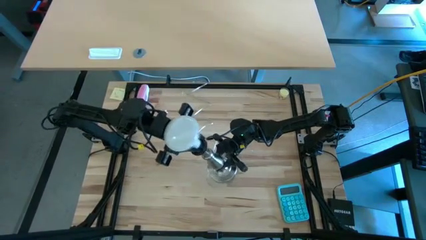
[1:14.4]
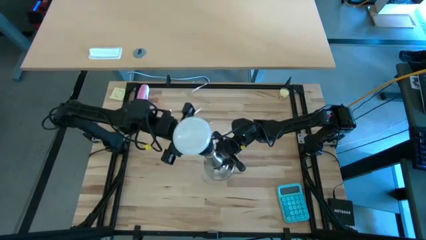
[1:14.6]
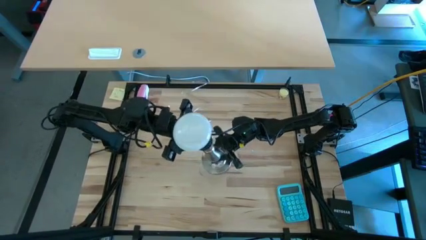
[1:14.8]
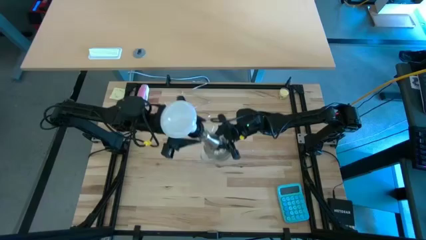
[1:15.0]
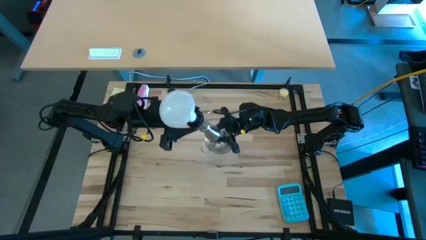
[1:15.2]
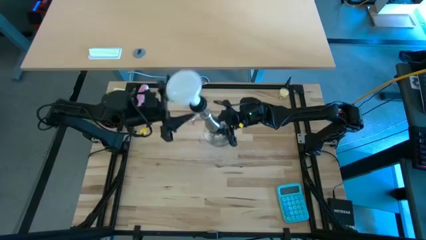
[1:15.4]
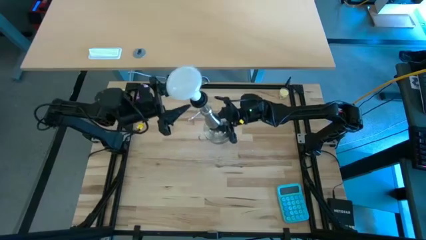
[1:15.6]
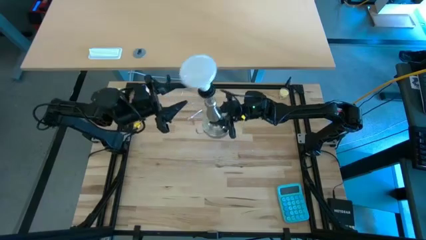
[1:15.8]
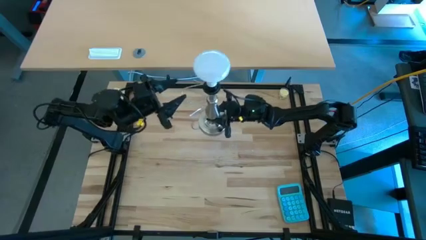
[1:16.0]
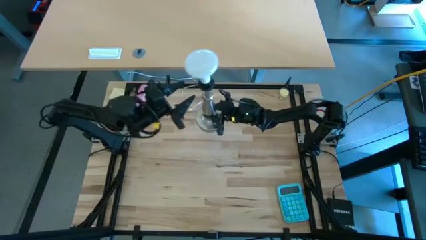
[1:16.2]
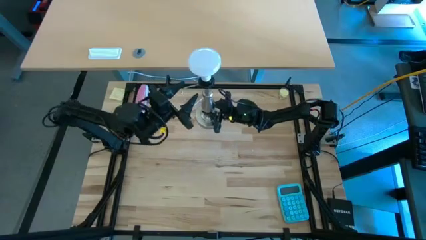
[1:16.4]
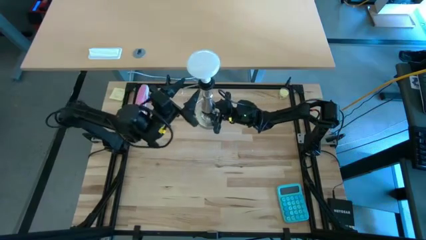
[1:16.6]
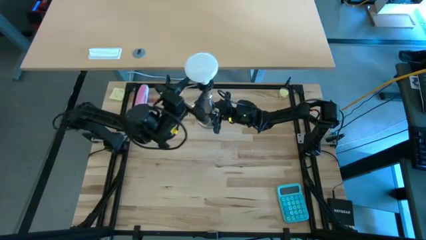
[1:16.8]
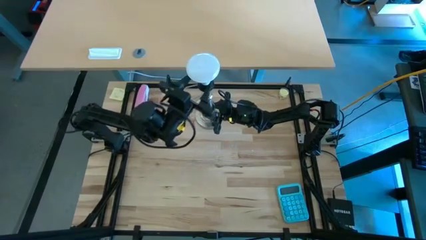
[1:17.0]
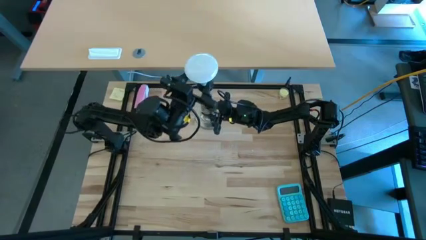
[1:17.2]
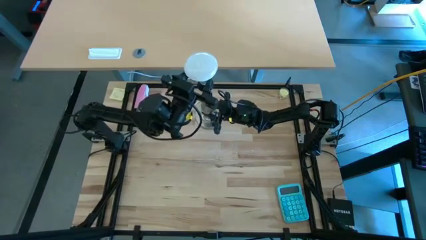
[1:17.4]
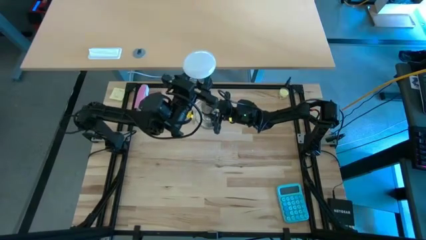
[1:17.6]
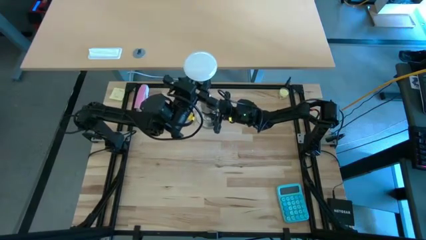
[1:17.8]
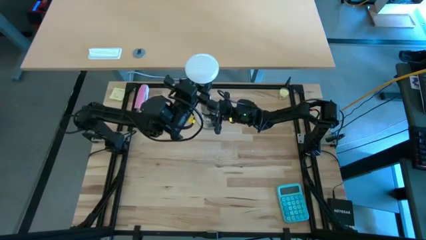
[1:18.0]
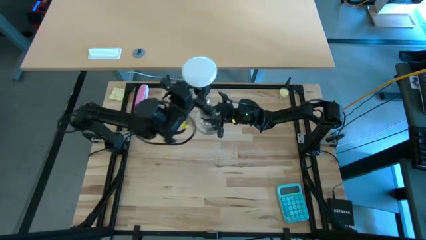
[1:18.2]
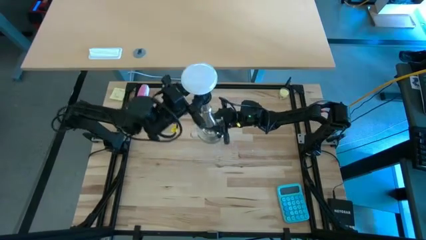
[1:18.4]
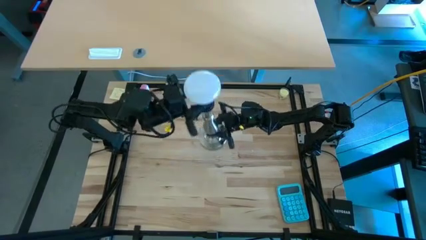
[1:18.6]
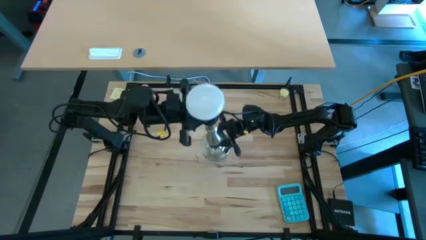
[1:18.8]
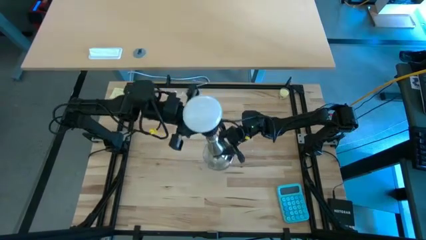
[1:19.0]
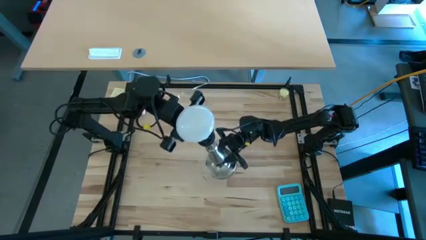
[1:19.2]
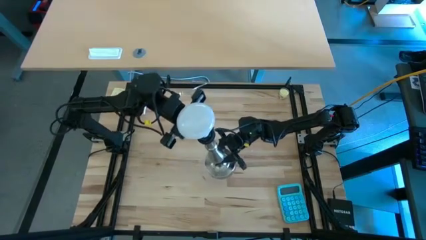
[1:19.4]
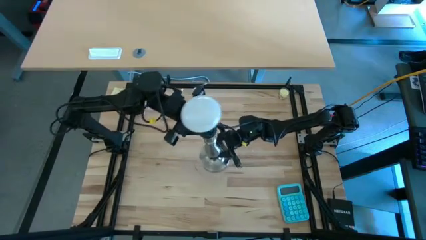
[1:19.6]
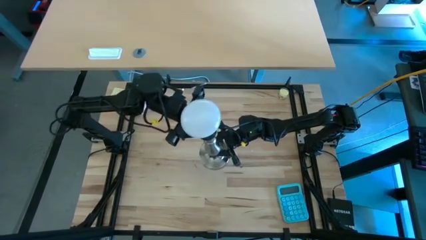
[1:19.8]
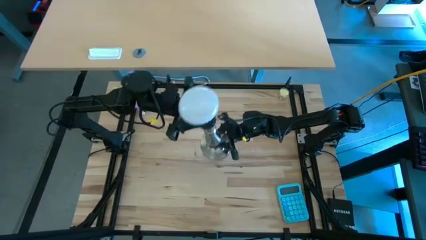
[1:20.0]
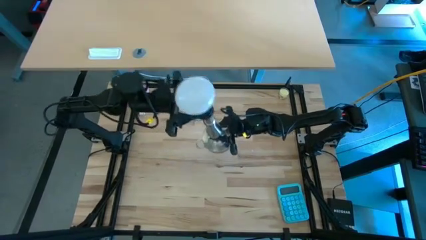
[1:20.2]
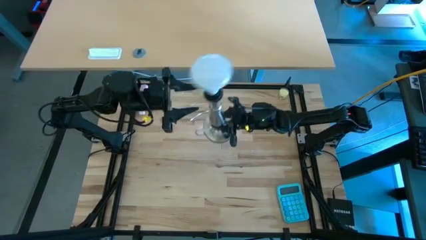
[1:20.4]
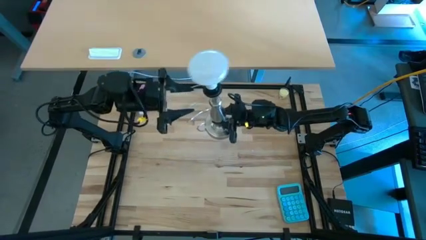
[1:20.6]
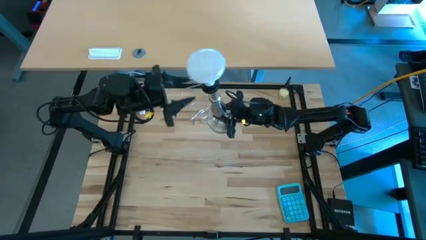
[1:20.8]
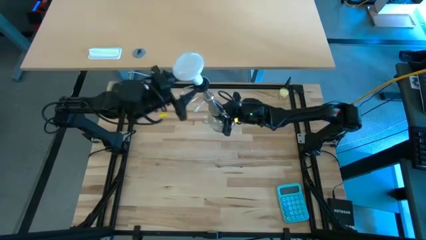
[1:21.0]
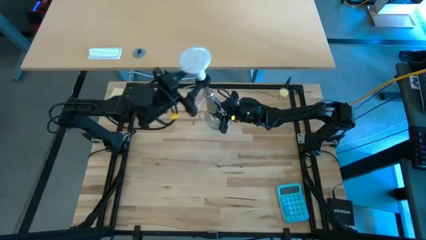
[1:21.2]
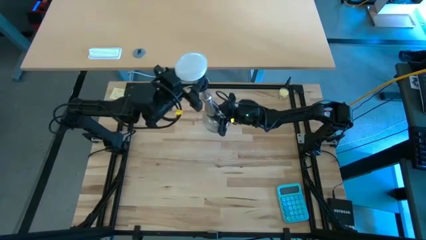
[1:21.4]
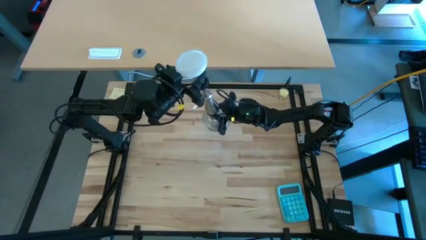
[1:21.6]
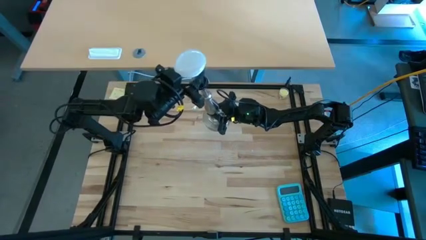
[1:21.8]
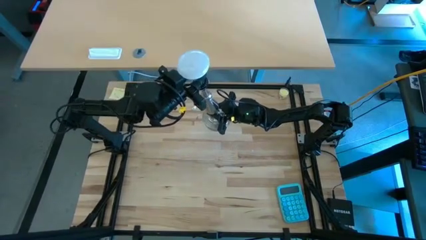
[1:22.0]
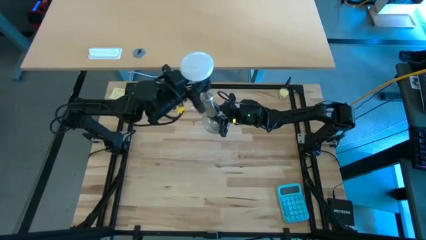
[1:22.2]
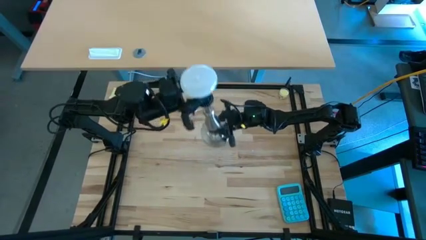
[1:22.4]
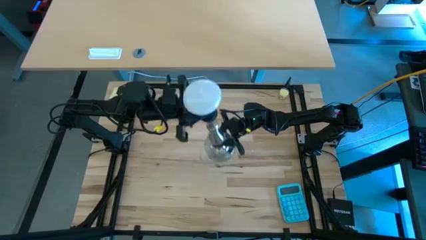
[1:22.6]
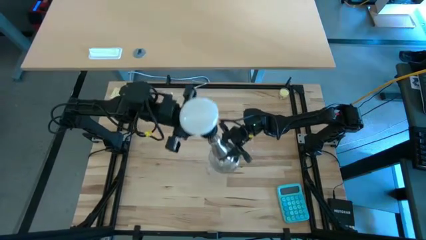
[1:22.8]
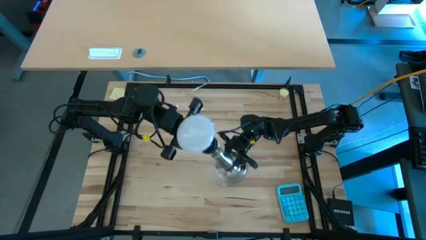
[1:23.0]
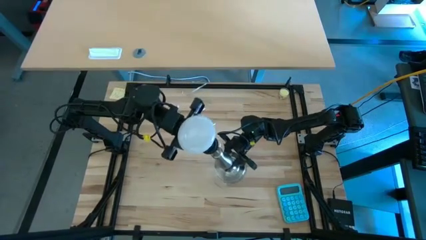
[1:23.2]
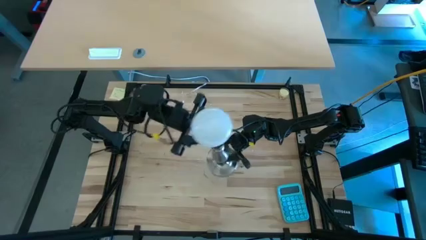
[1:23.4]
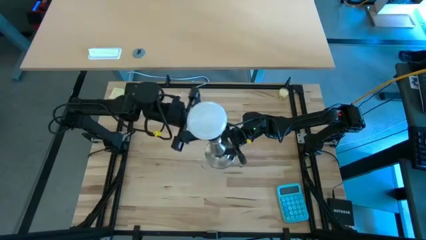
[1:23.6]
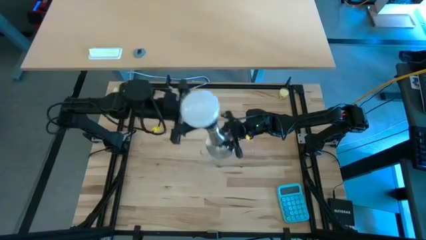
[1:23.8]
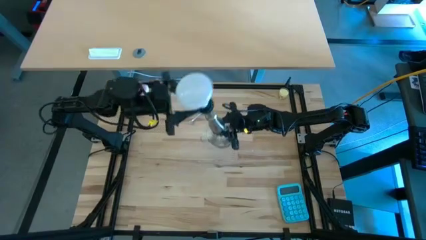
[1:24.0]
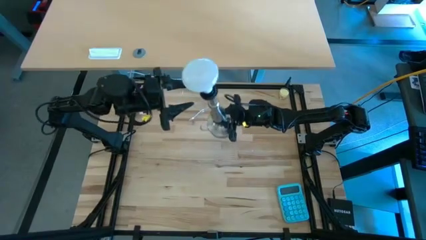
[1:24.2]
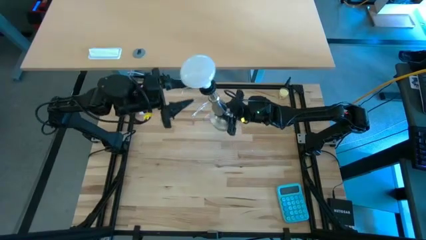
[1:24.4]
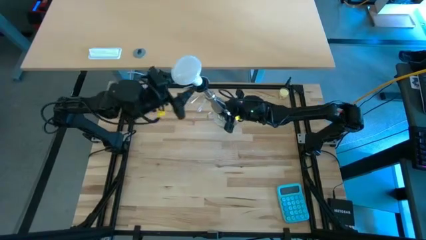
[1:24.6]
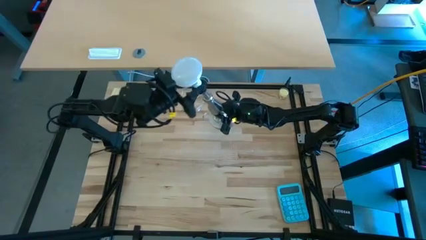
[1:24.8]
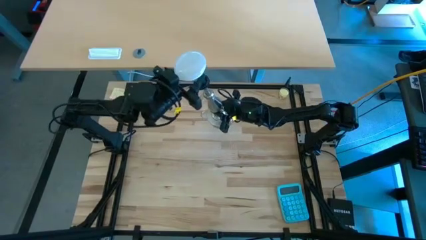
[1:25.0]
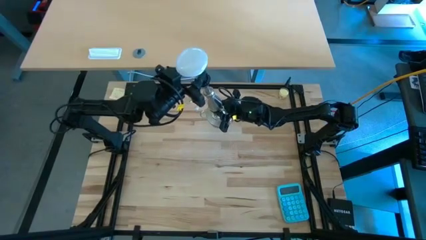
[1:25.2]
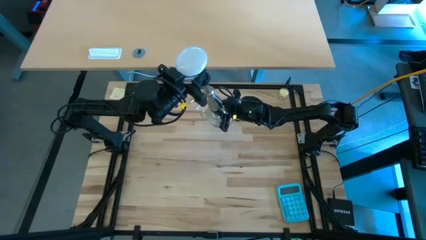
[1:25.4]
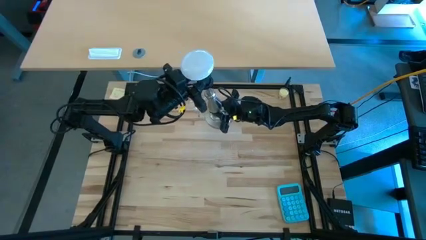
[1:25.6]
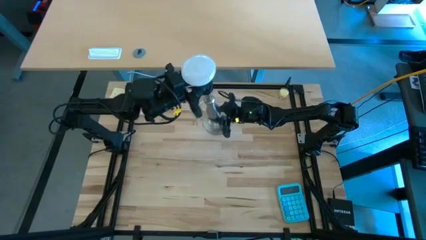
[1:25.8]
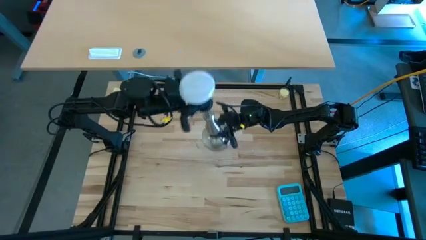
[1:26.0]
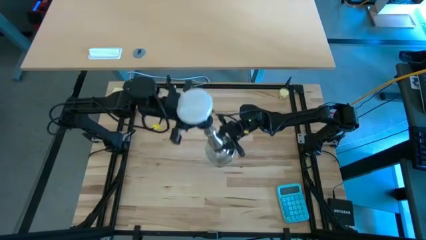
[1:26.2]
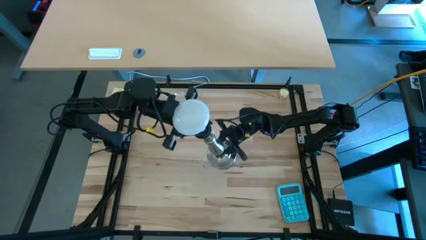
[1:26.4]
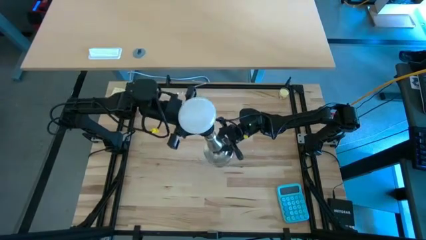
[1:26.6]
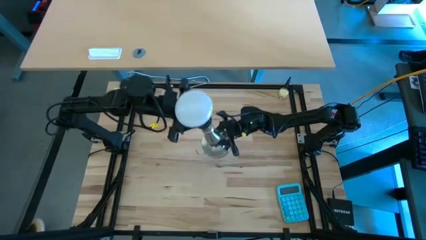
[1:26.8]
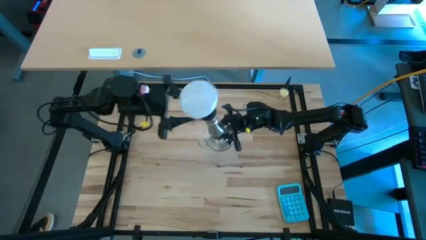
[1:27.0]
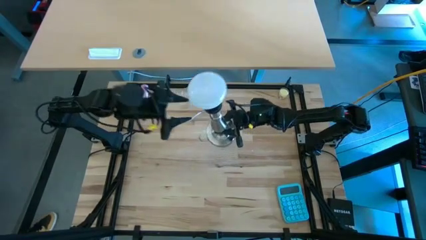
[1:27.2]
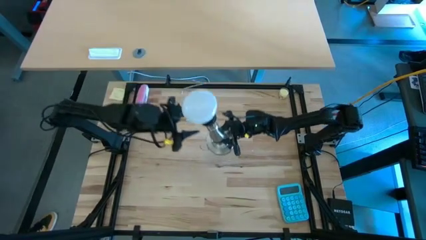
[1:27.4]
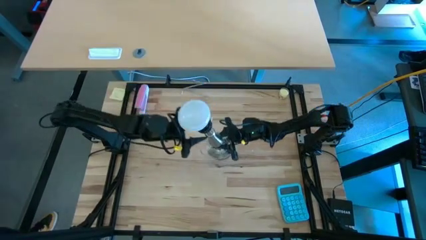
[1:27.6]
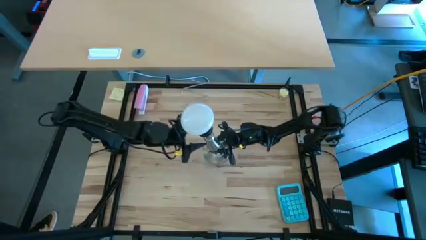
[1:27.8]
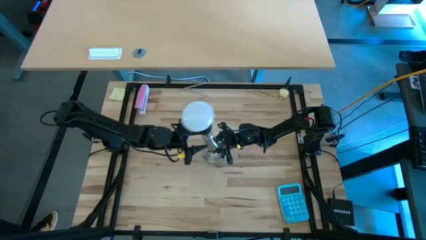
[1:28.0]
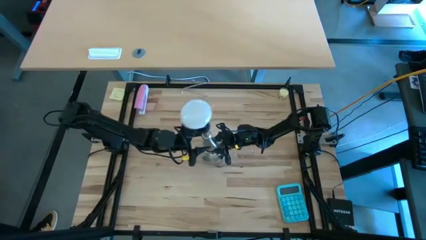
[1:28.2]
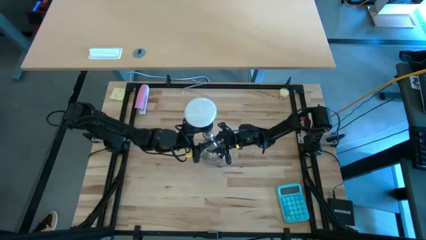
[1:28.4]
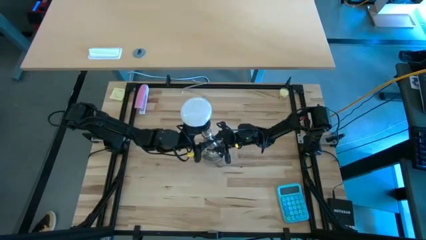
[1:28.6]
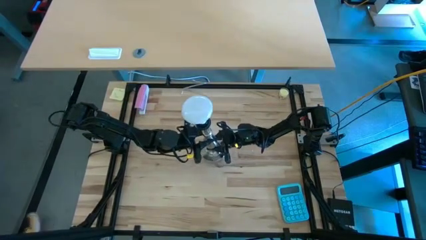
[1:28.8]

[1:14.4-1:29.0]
Task: Screw lightbulb
Insert the lightbulb into the desk lamp
